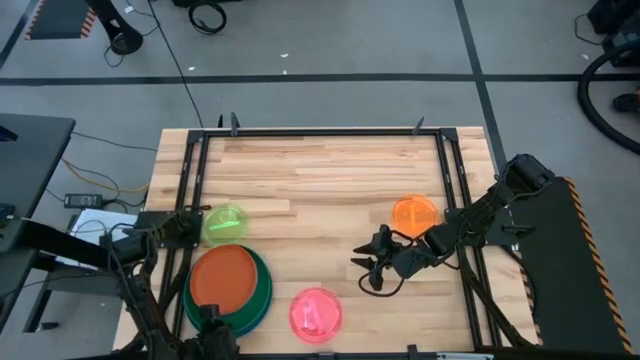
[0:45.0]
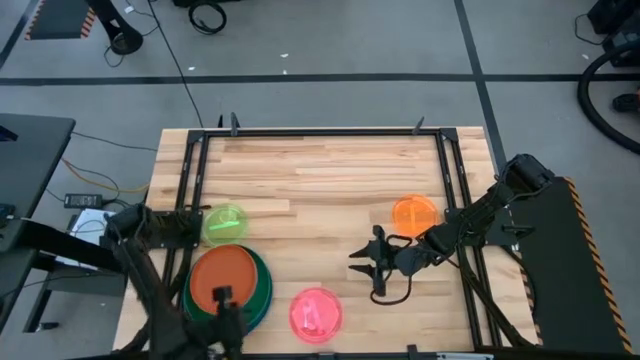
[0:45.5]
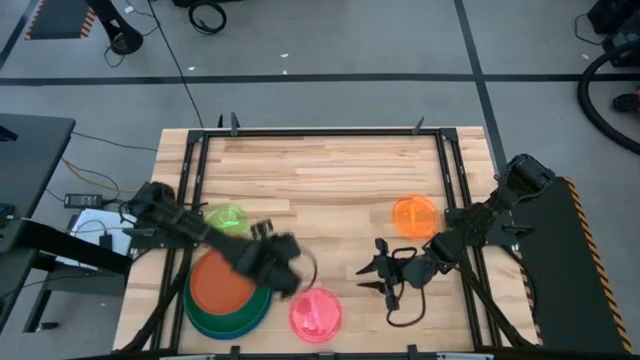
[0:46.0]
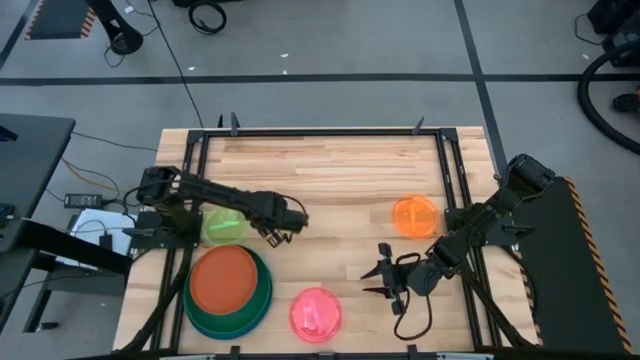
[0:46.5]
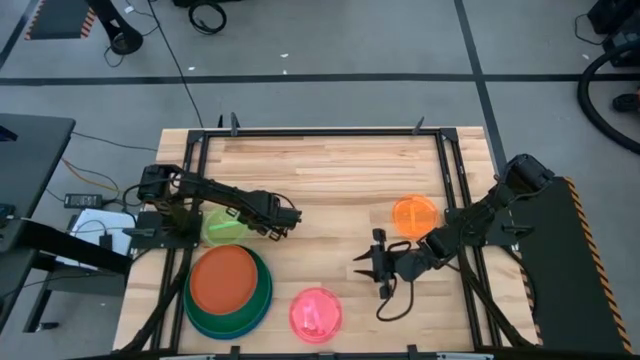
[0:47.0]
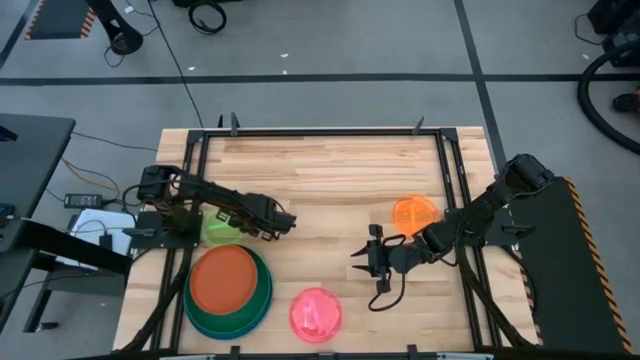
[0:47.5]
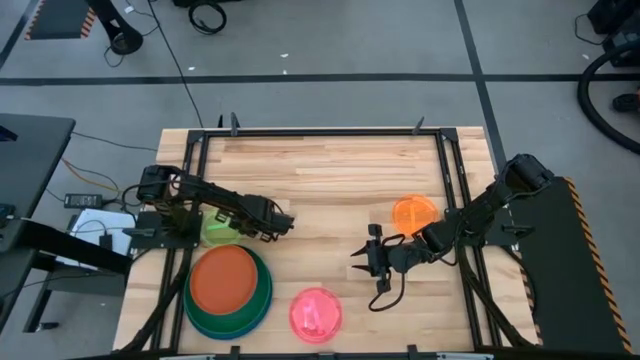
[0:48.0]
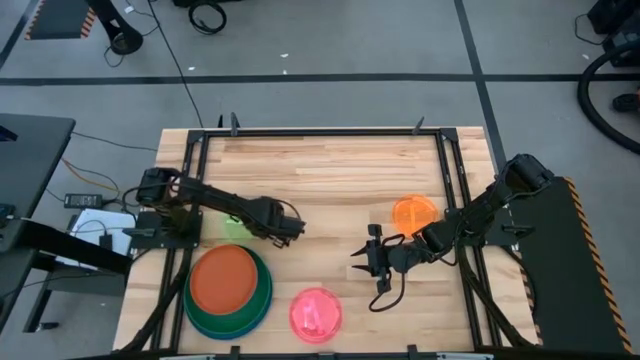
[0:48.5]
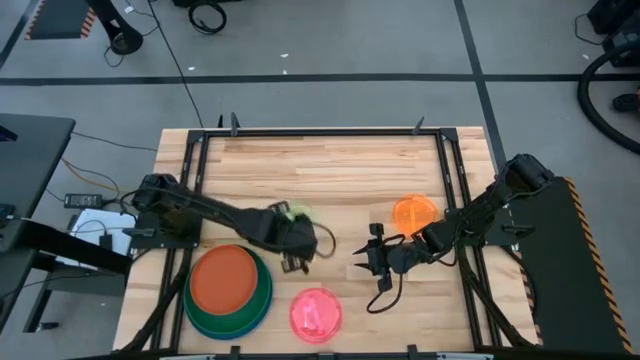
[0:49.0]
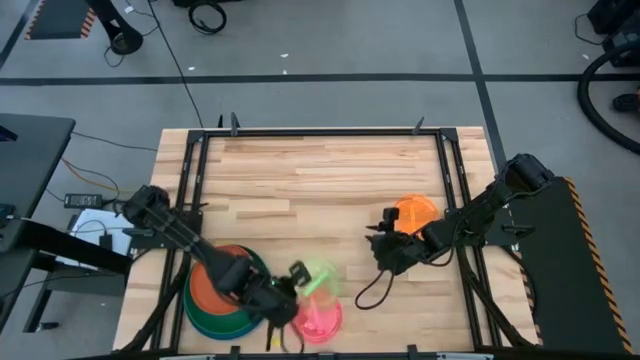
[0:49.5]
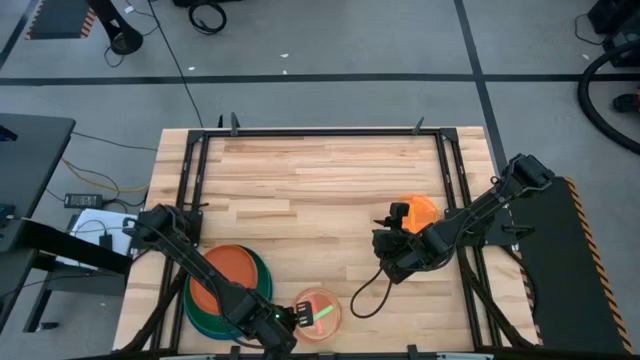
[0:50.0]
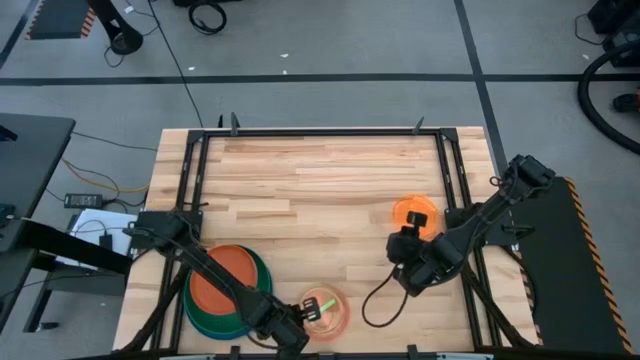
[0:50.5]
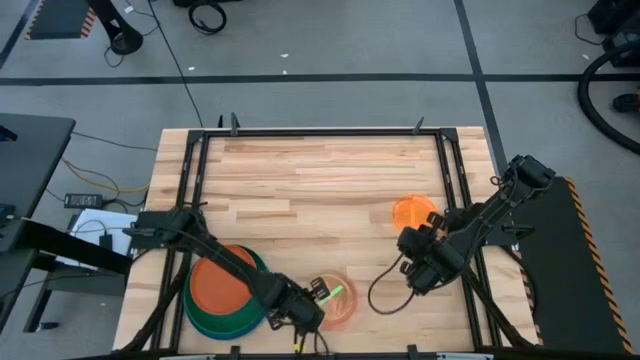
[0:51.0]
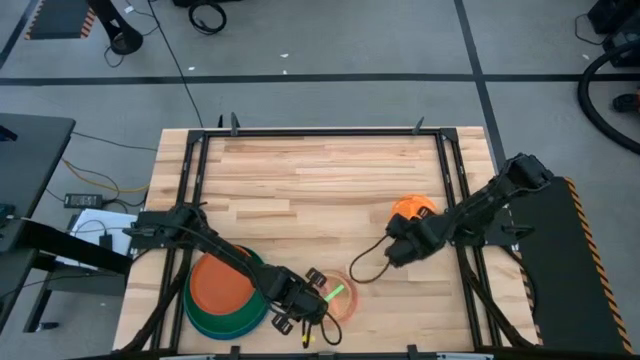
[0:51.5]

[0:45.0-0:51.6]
Task: Stack plastic plates
Stack the transparent green plate on top of the transparent pink plate

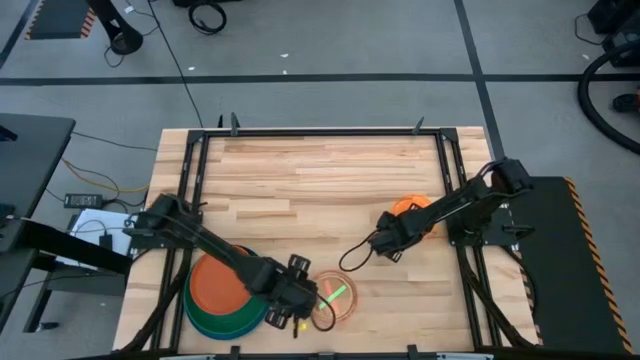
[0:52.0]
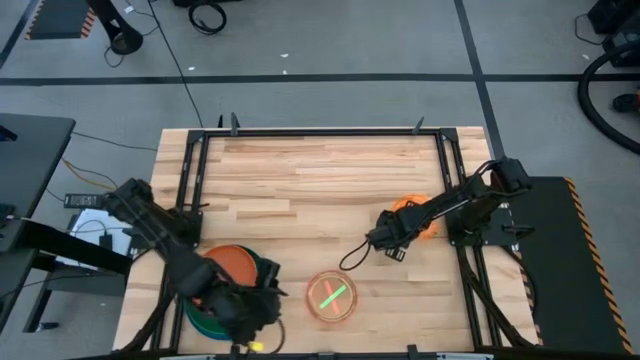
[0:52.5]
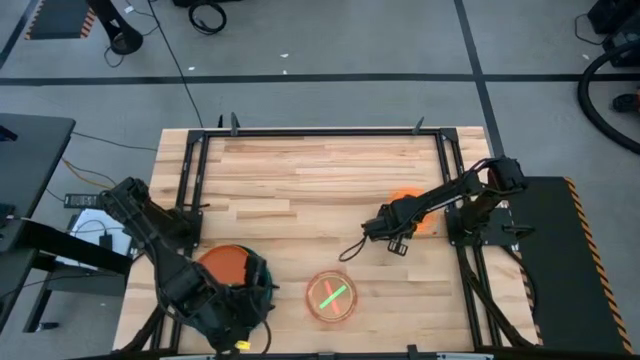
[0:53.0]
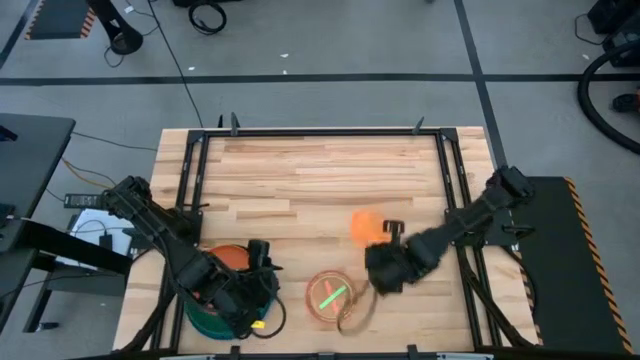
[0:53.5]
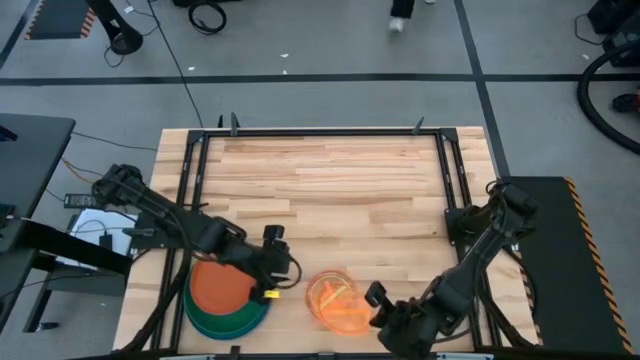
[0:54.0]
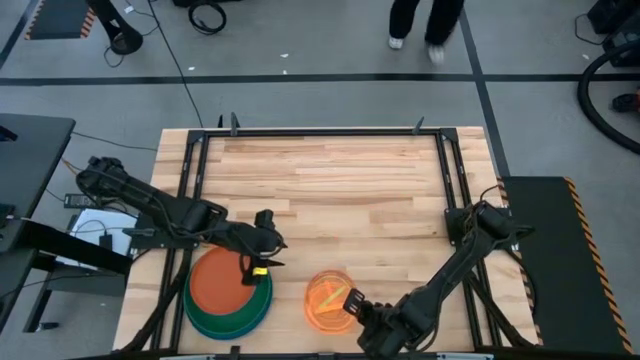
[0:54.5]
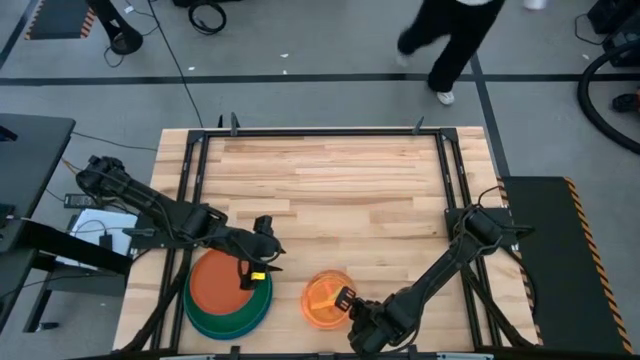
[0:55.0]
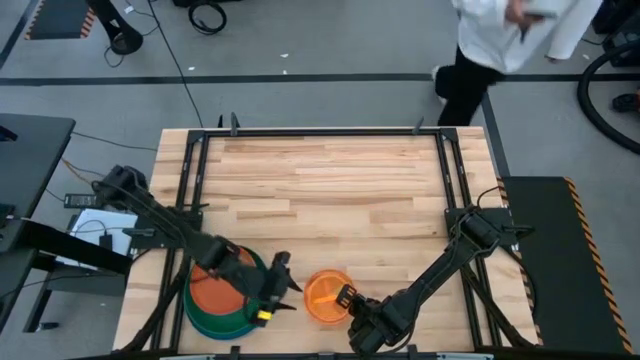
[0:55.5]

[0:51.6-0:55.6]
Stack the transparent orange plate on top of the transparent green plate

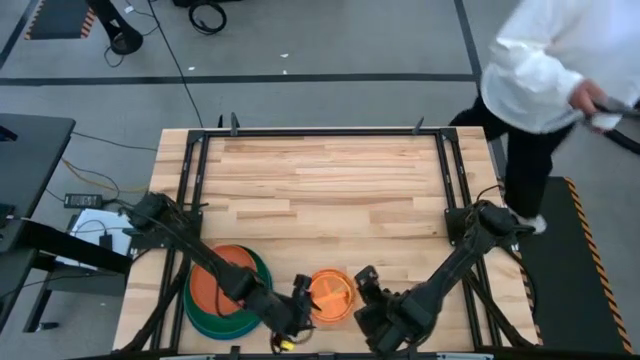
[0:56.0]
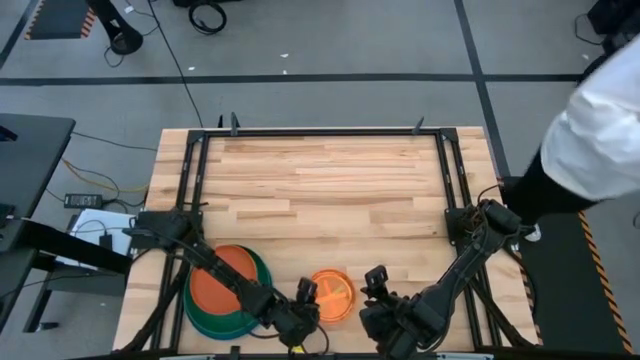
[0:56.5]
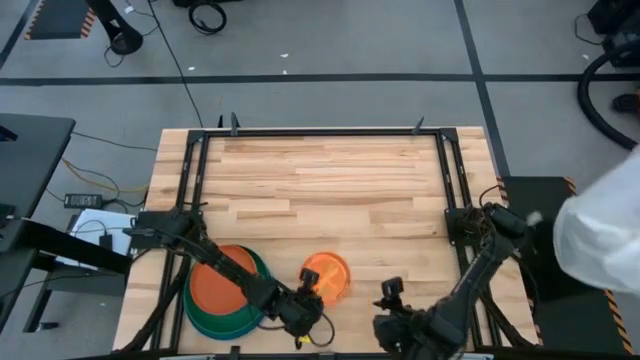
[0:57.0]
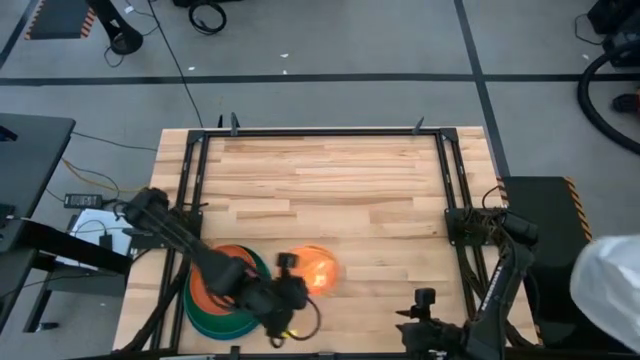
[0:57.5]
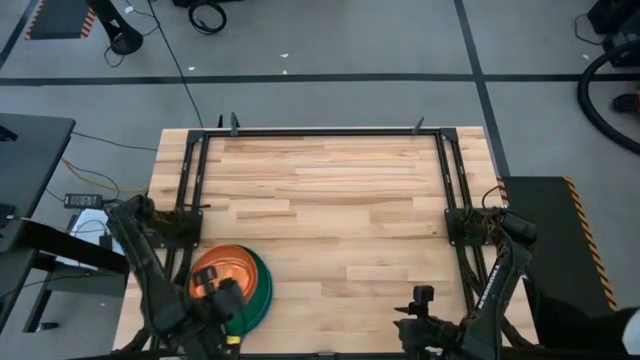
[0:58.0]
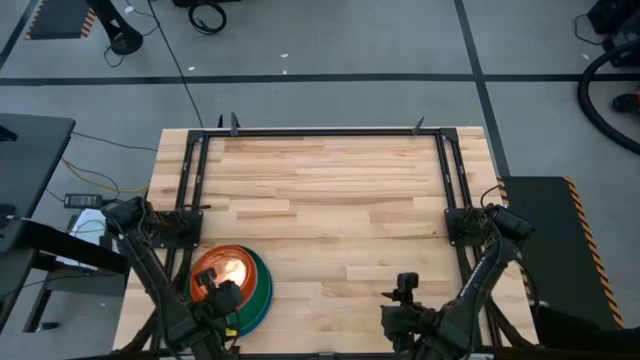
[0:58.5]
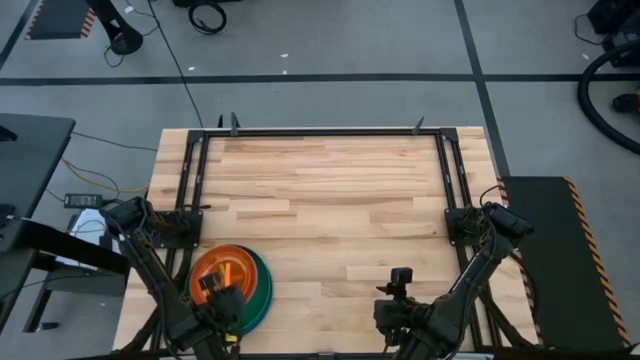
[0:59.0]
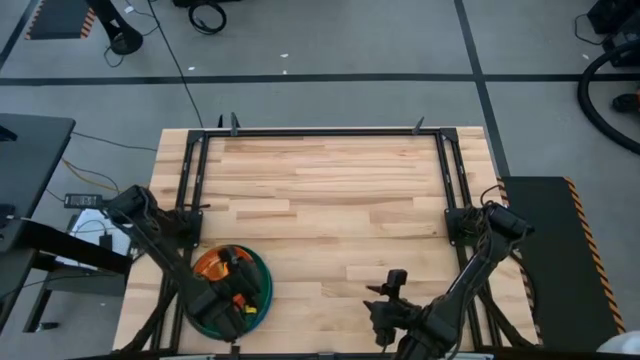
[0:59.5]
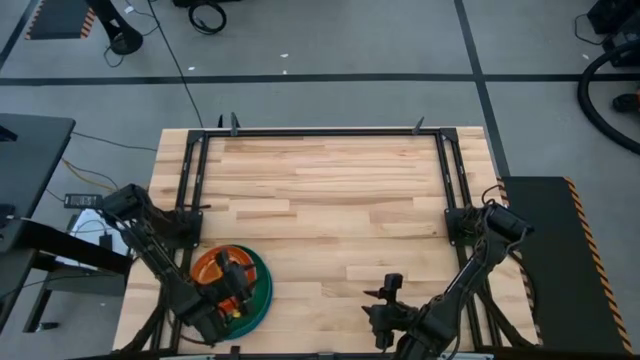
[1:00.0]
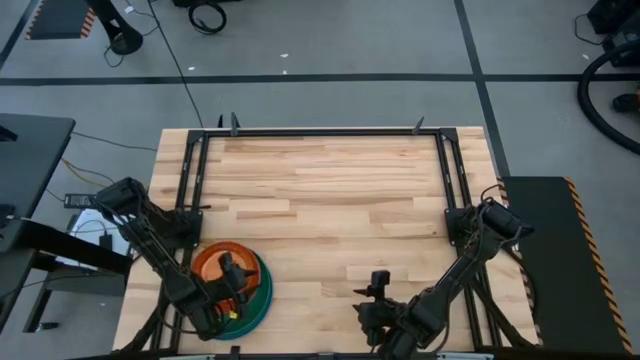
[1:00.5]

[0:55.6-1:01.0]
Put the stack of plates on top of the orange plate

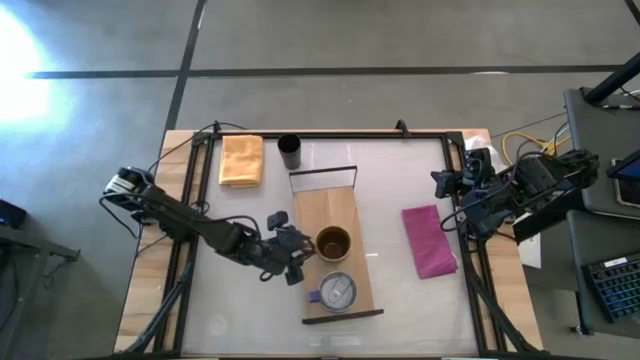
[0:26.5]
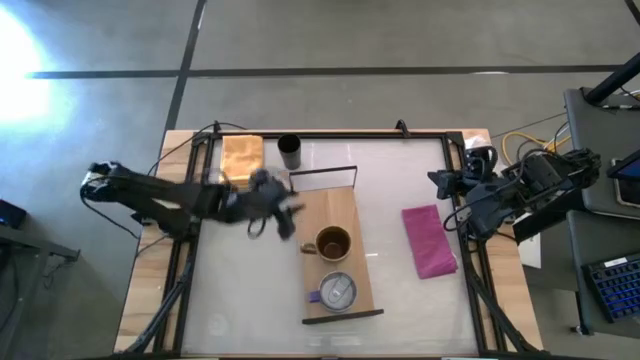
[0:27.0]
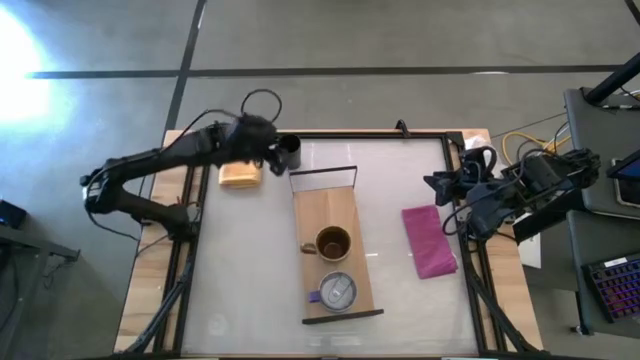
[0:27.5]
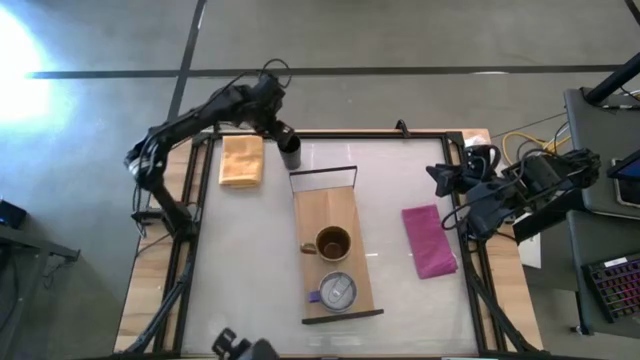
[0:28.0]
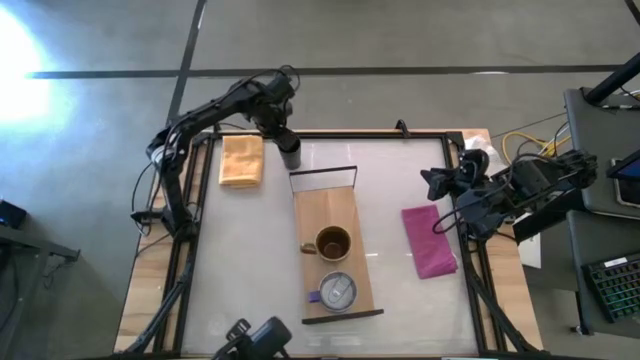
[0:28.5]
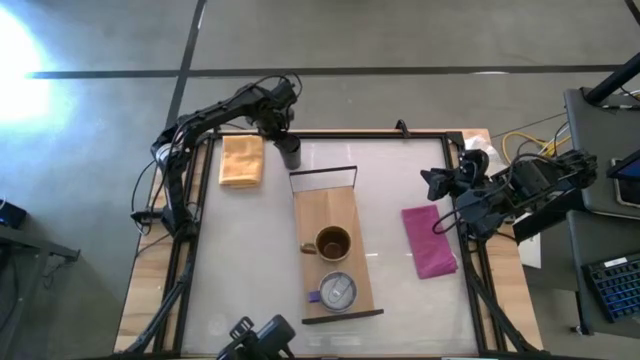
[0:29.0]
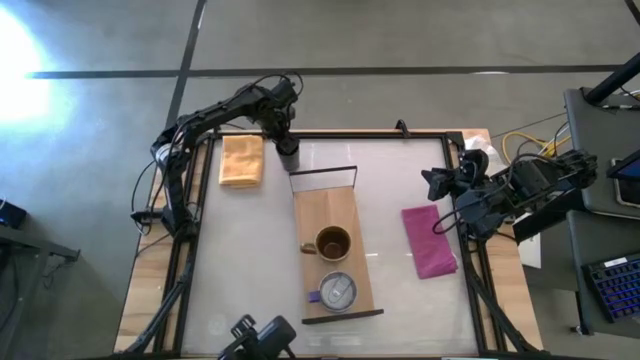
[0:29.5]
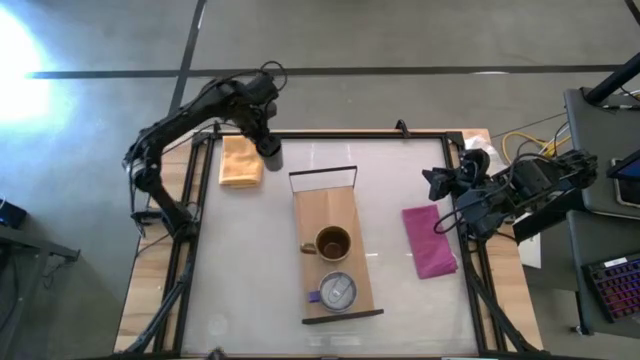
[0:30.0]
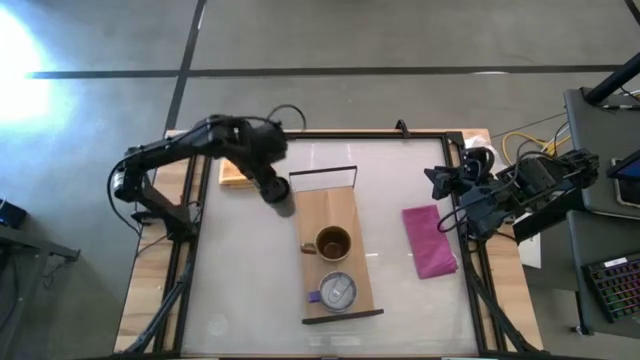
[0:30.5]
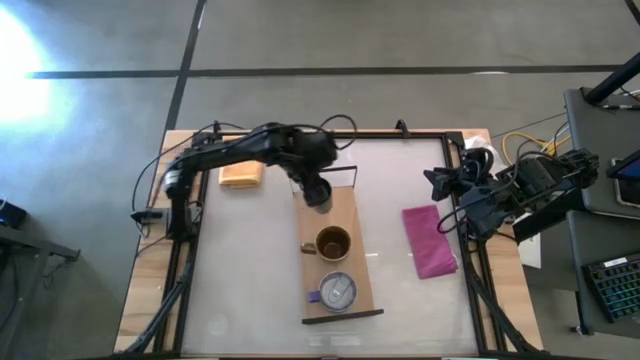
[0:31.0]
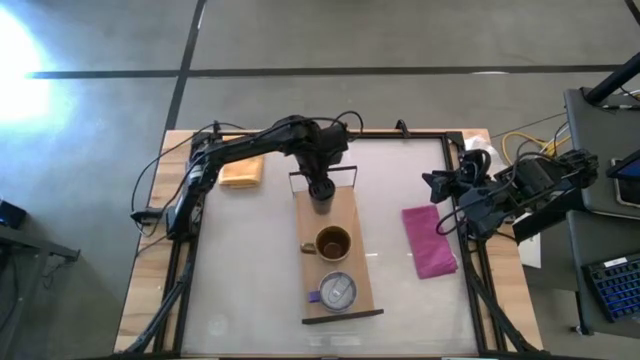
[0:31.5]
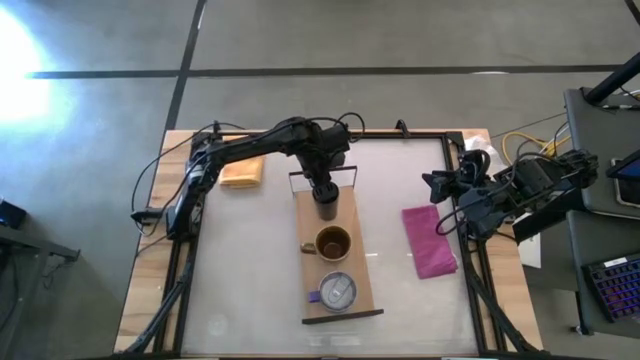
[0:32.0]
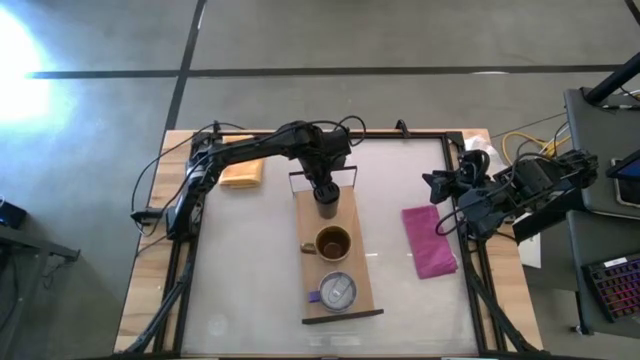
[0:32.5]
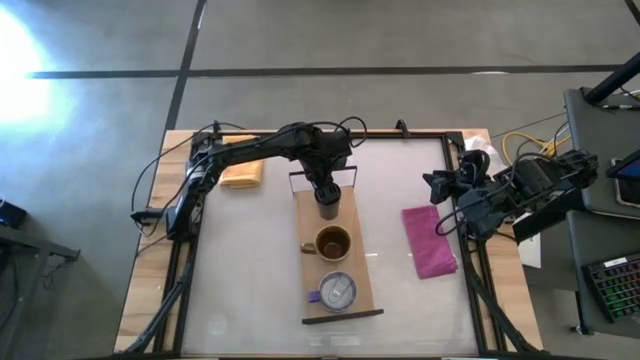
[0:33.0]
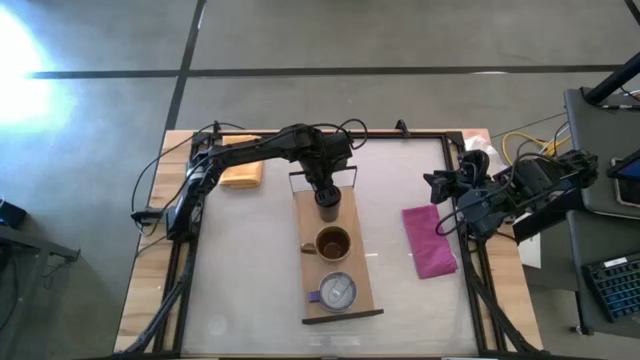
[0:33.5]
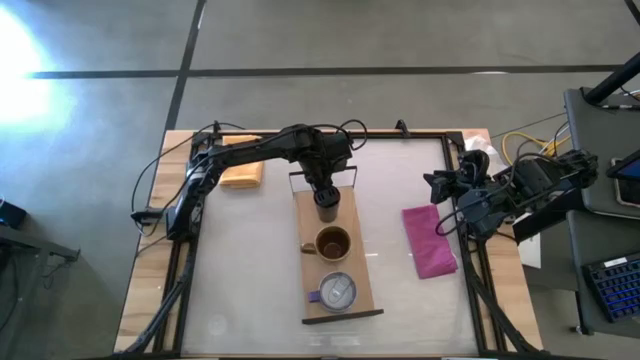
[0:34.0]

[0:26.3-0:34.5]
Task: Stack small to large cups/mugs on shelf
Put the black cup on the shelf
